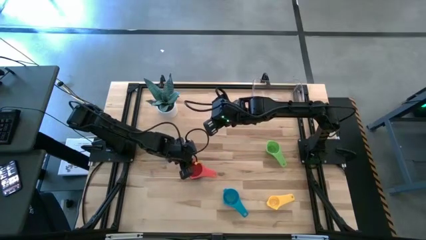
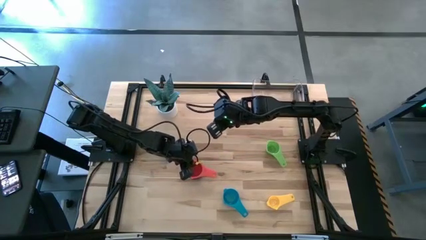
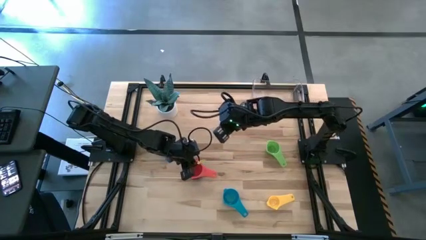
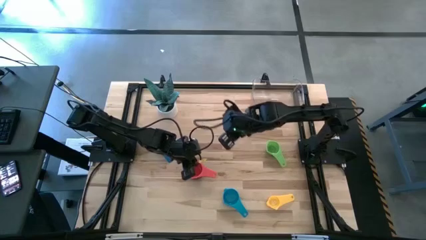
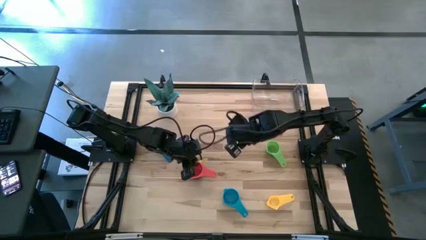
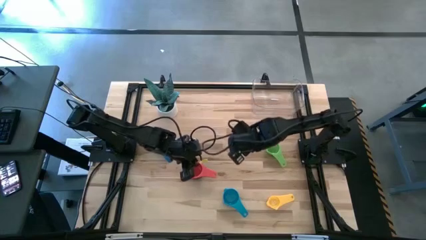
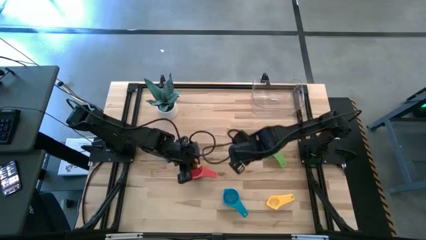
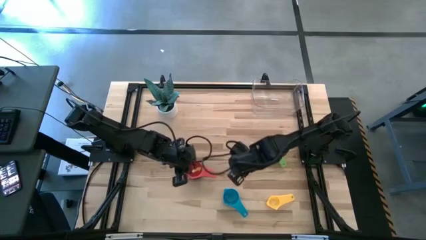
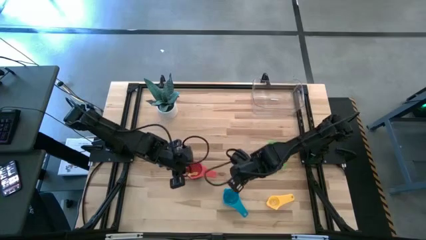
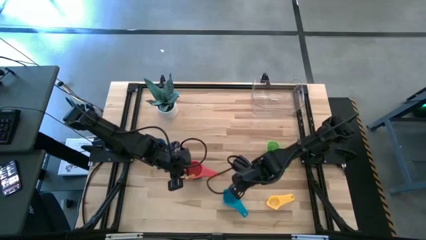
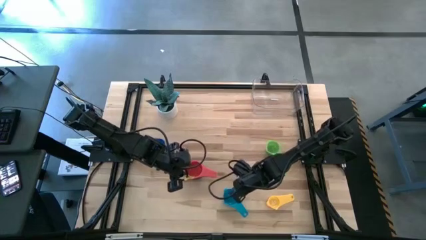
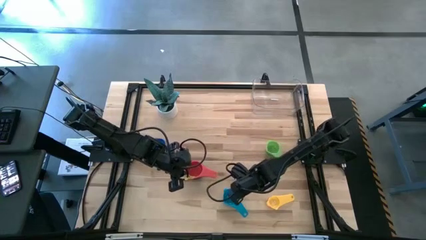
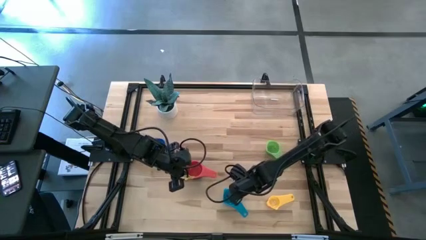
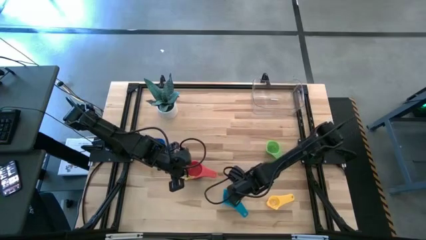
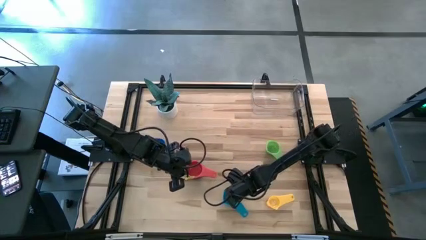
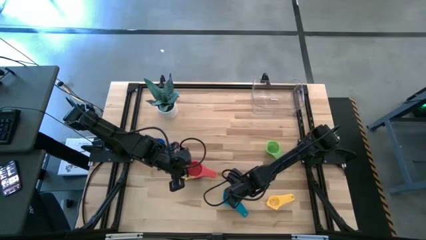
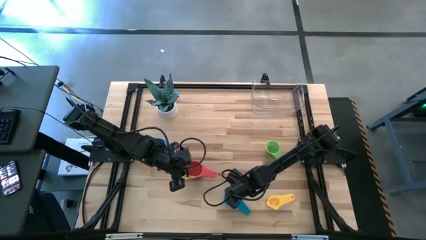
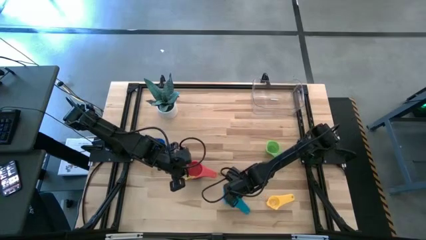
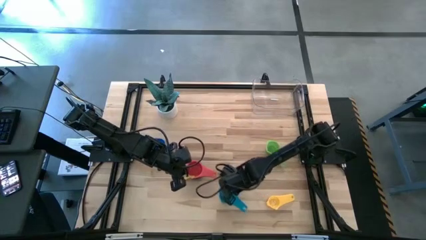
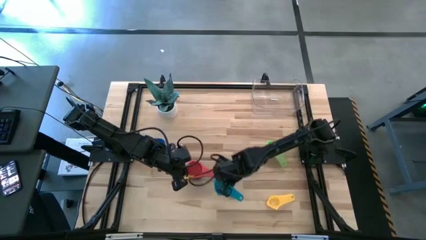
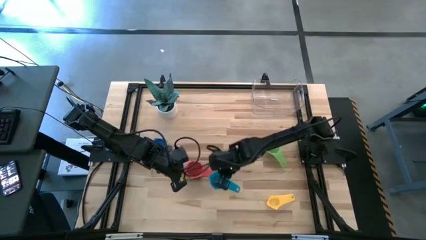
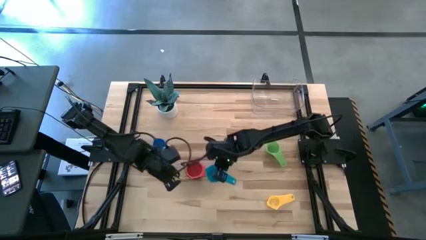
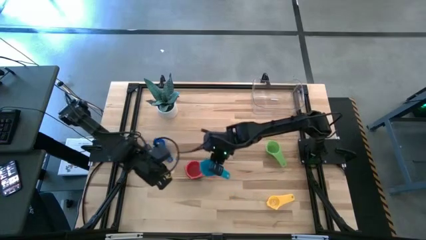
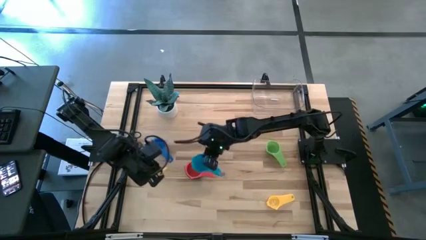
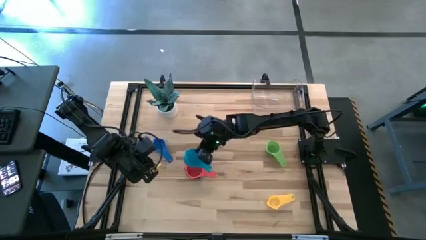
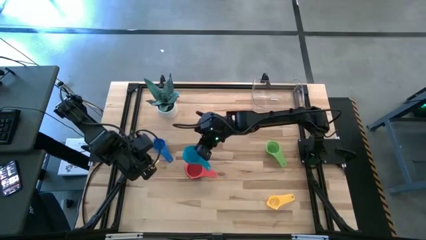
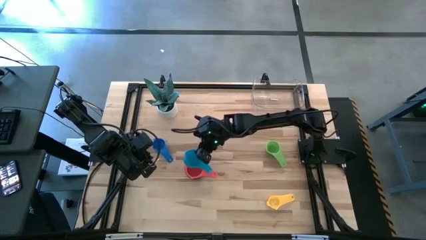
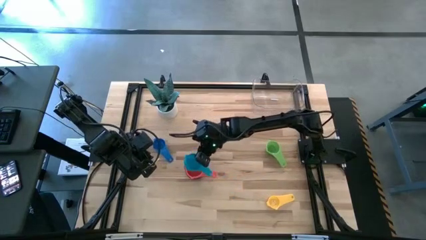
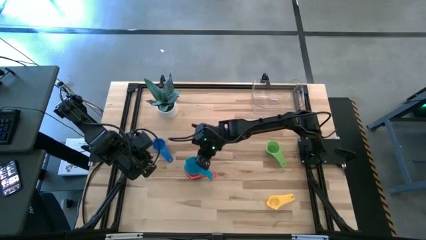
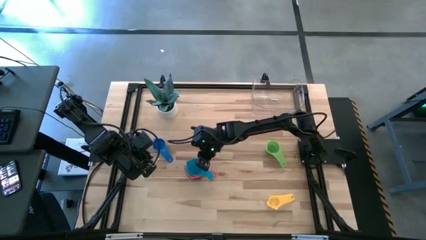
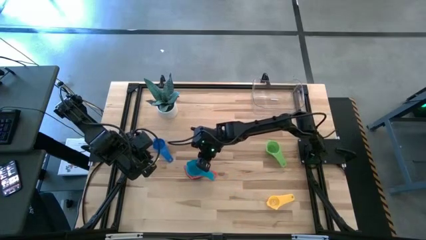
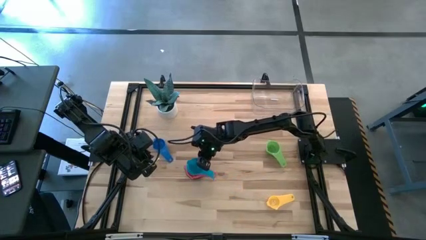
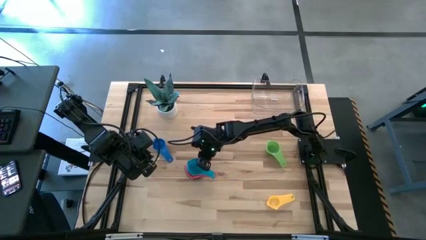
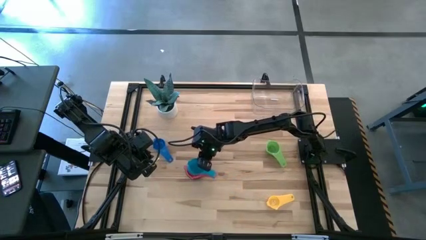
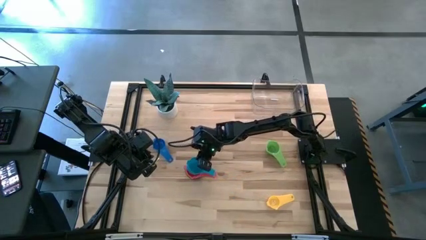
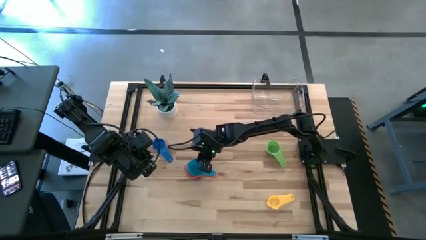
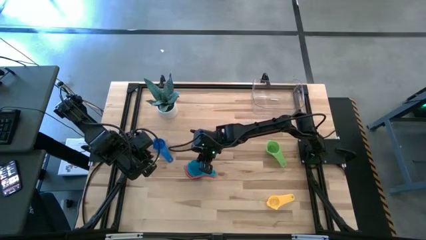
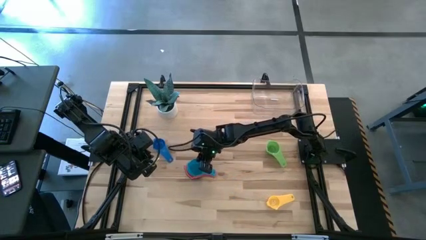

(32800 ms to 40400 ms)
Task: Nest measuring cups in basket
Stack the light blue measuring cup on top of the red measuring cup

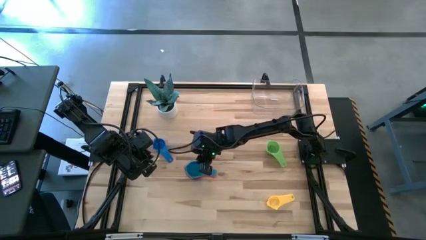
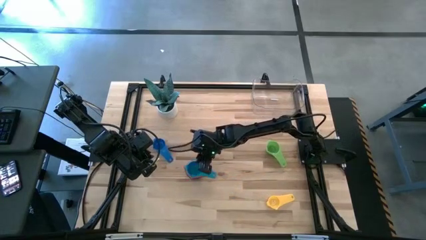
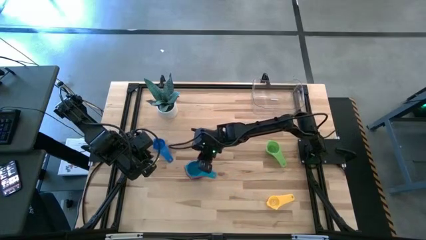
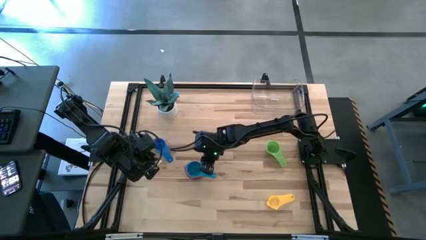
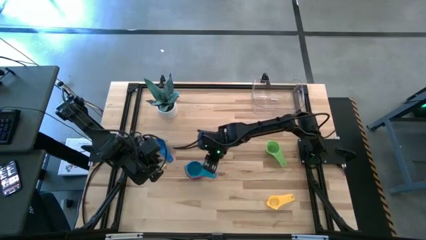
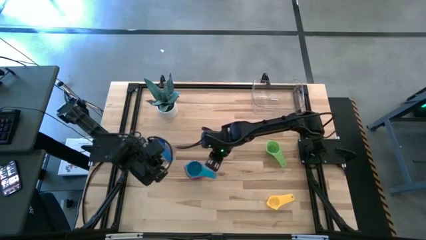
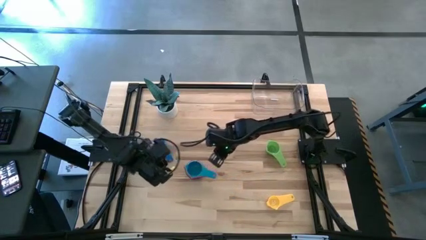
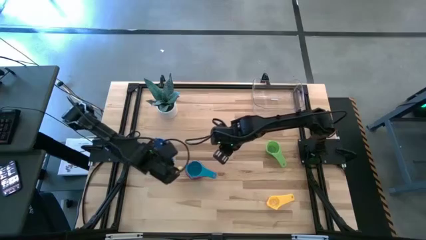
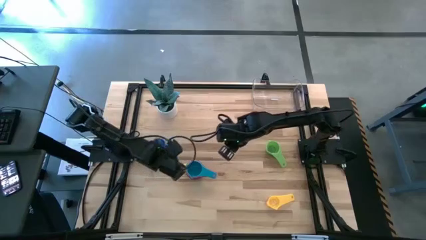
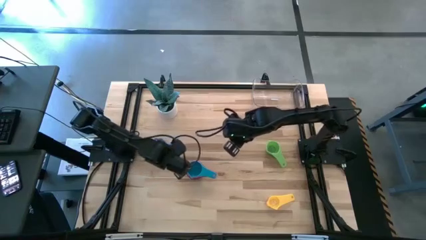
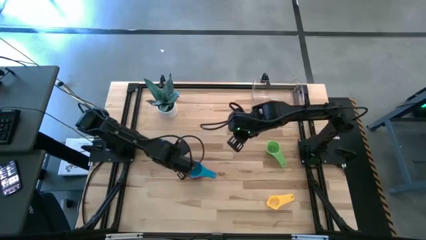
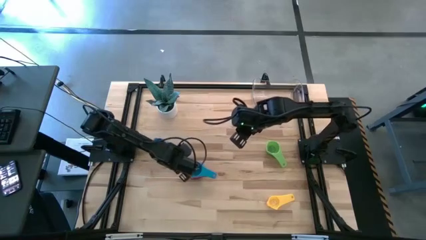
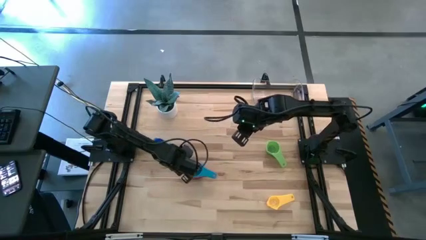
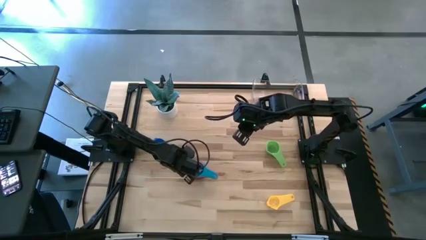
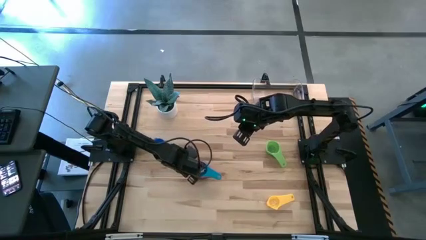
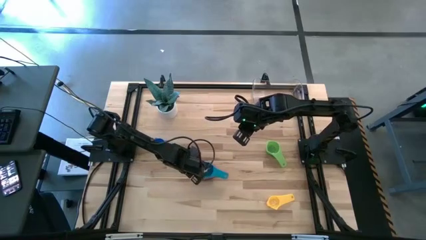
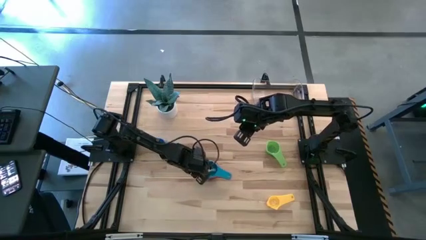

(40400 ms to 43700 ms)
Adjust the nested measuring cups on the table

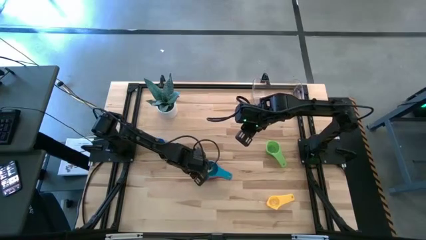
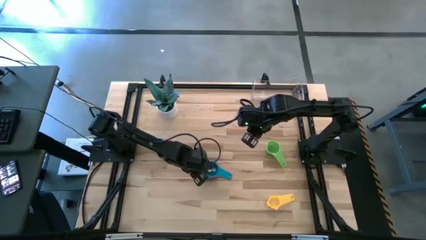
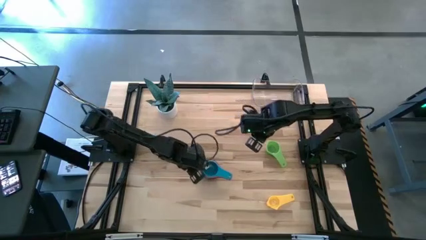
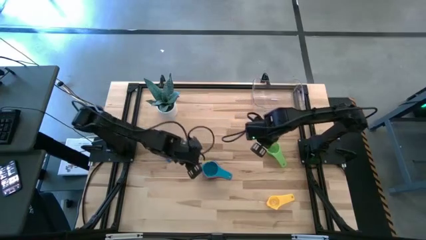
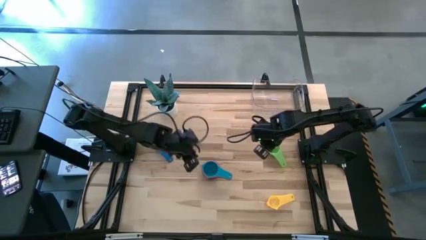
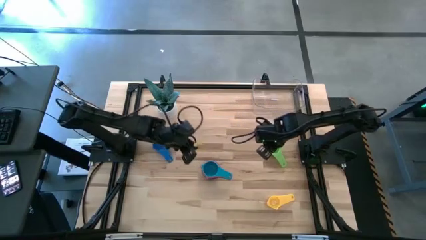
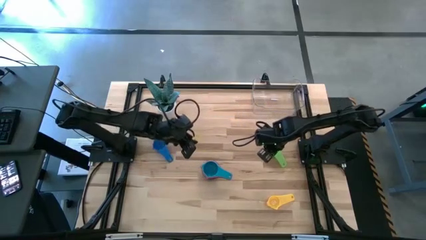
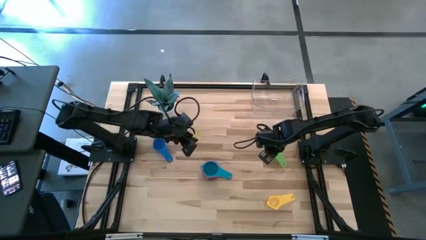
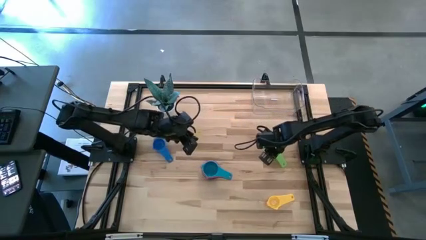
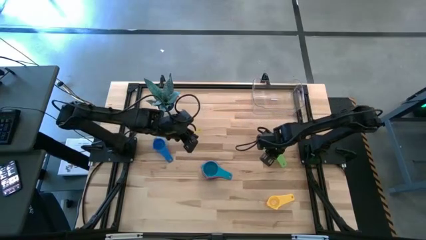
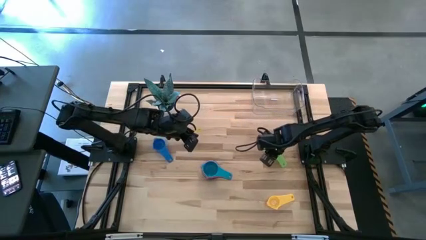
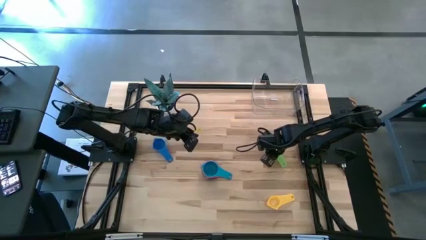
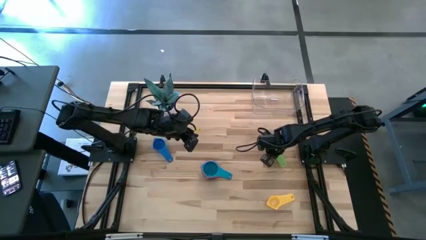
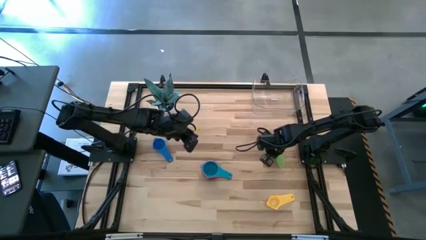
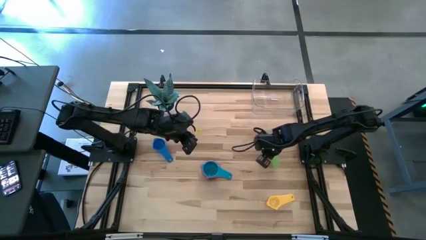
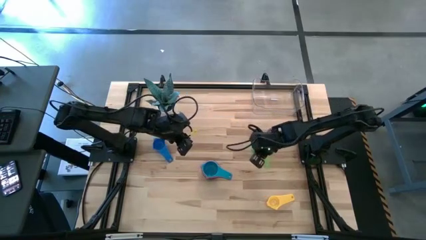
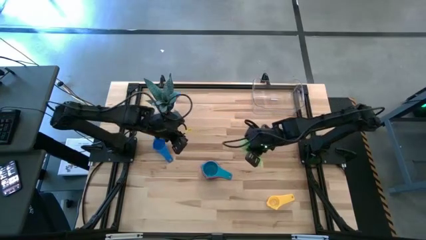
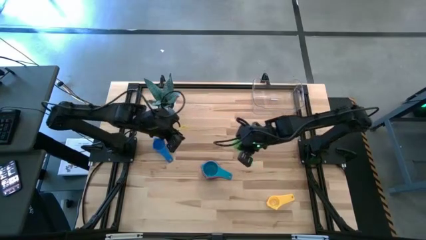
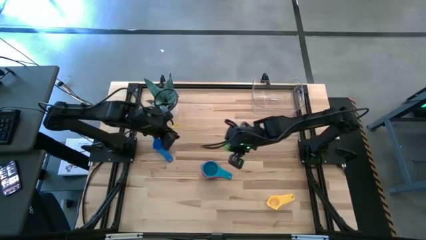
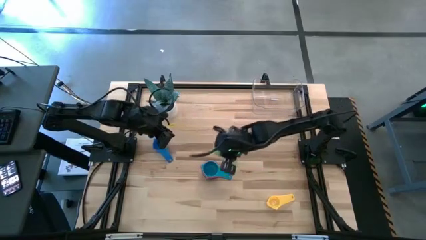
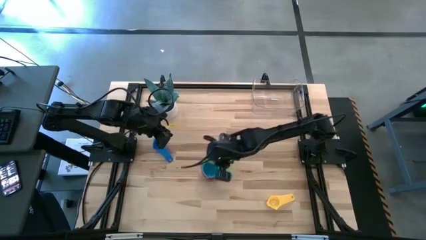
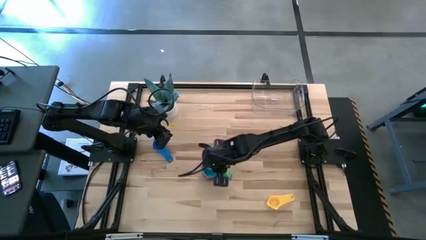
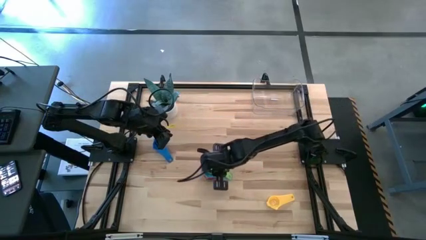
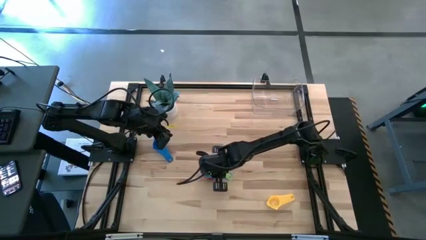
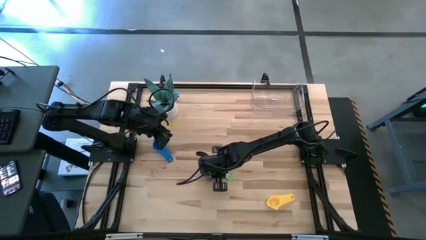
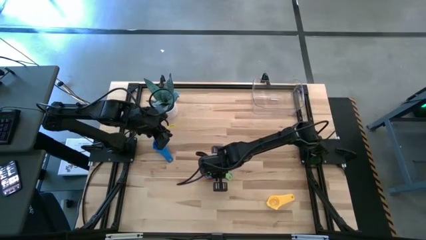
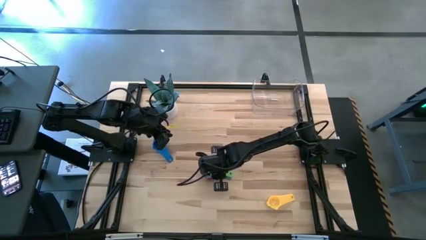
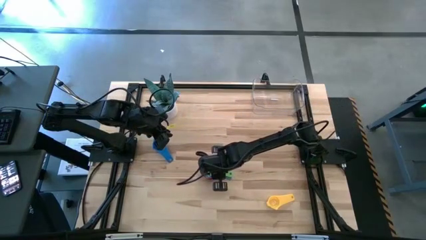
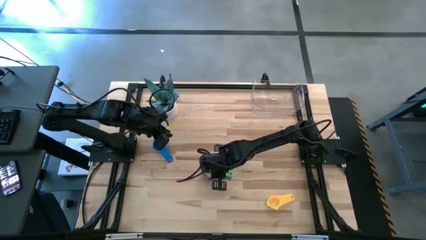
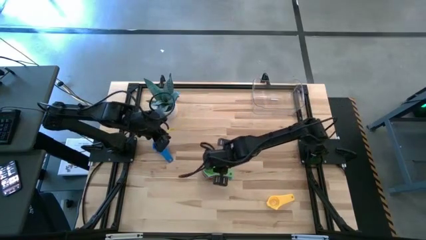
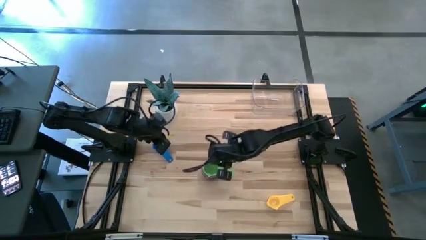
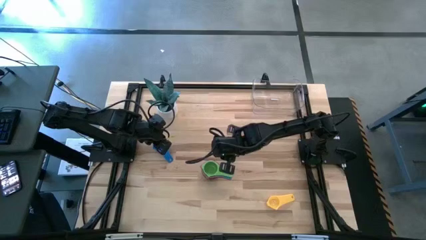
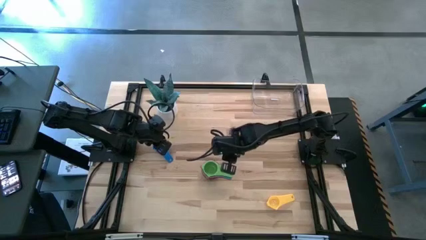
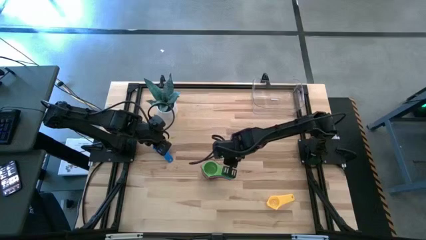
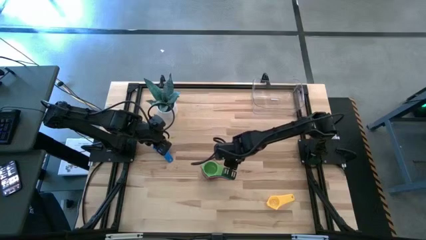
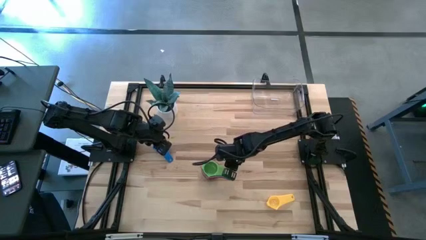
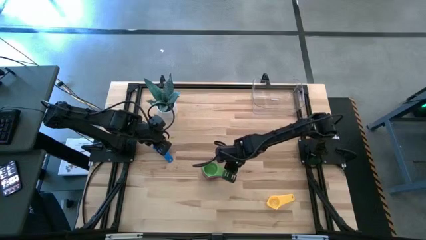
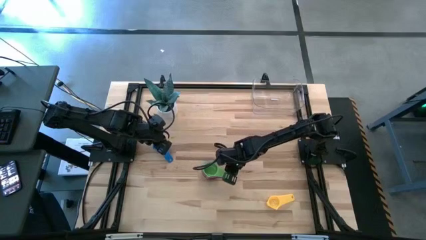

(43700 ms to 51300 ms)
Stack the green measuring cup on top of the light blue measuring cup
